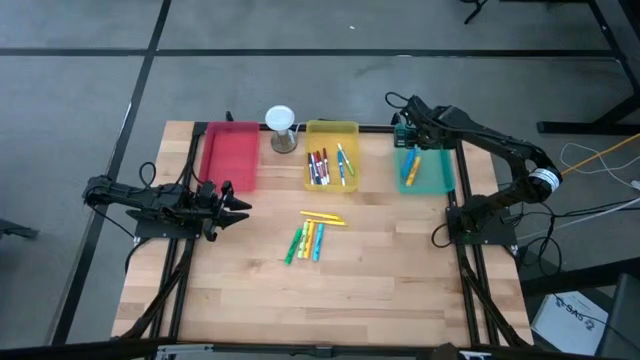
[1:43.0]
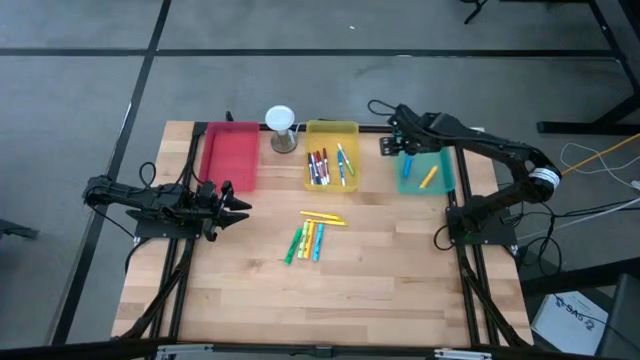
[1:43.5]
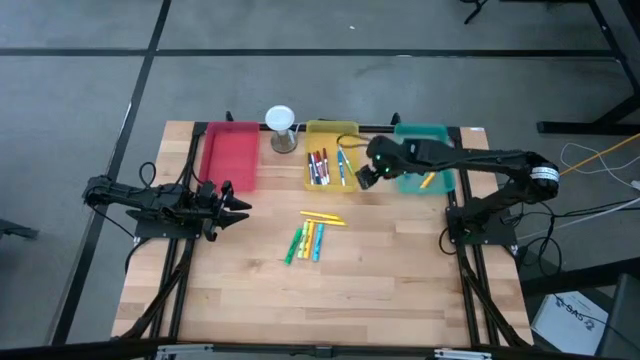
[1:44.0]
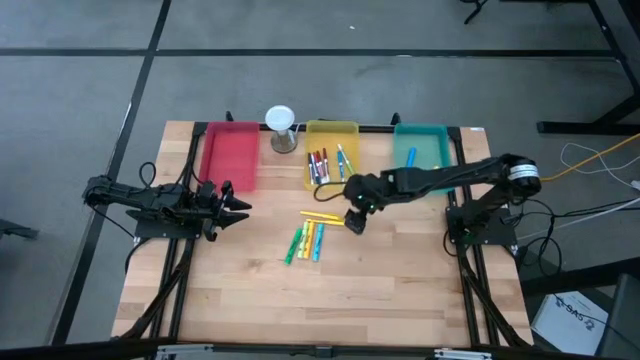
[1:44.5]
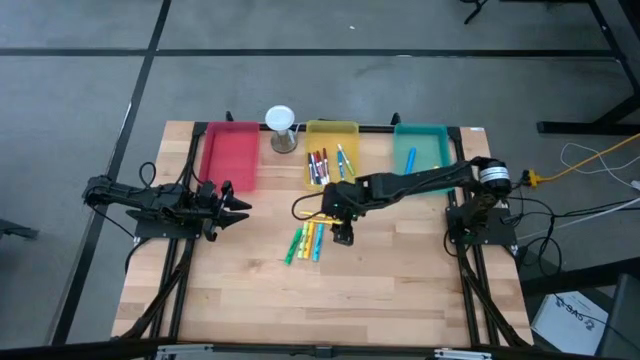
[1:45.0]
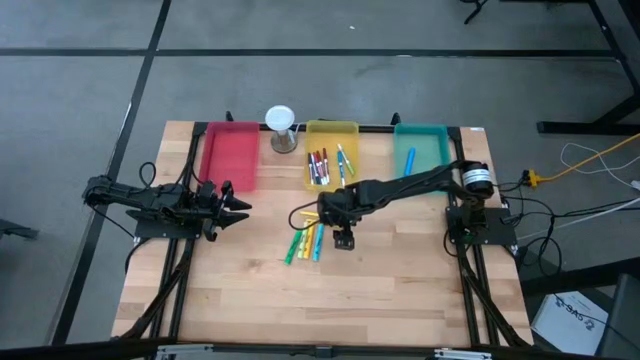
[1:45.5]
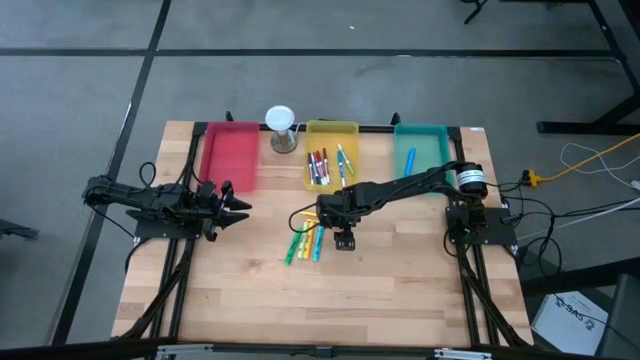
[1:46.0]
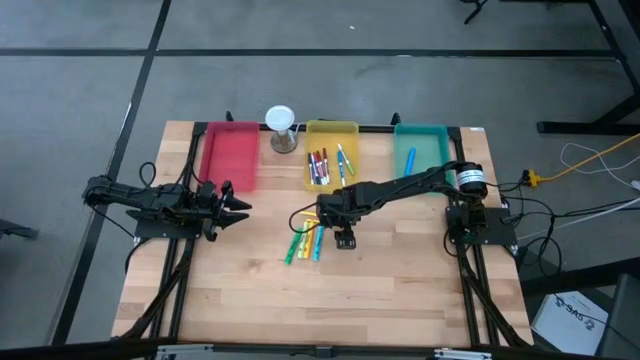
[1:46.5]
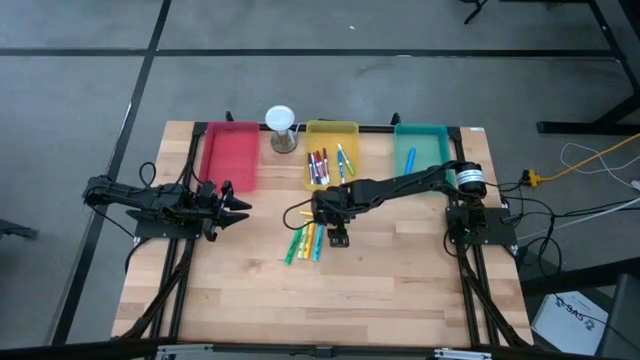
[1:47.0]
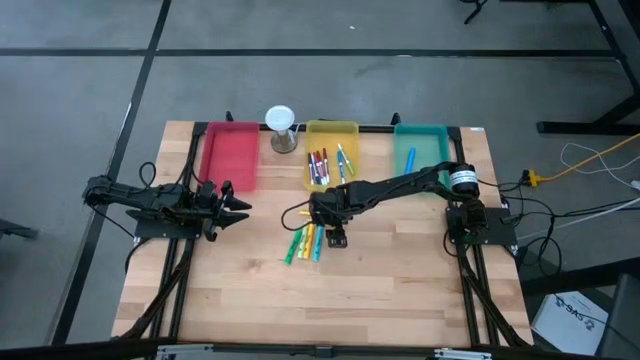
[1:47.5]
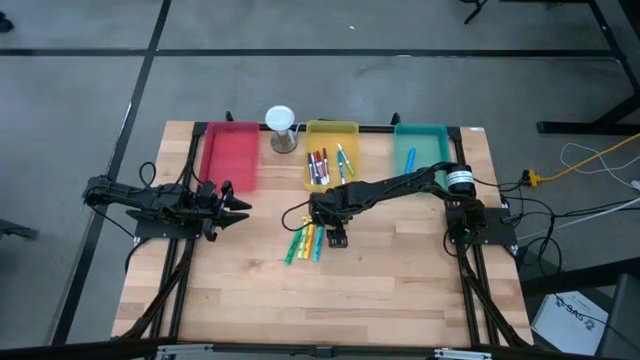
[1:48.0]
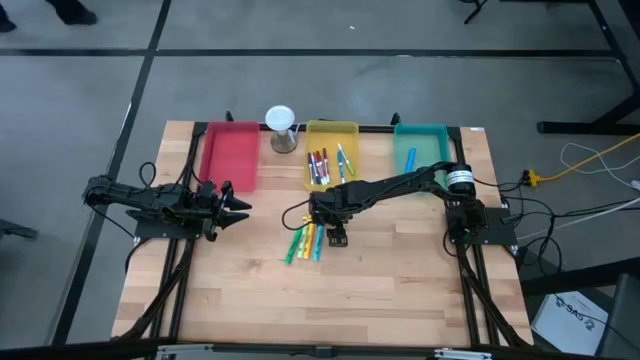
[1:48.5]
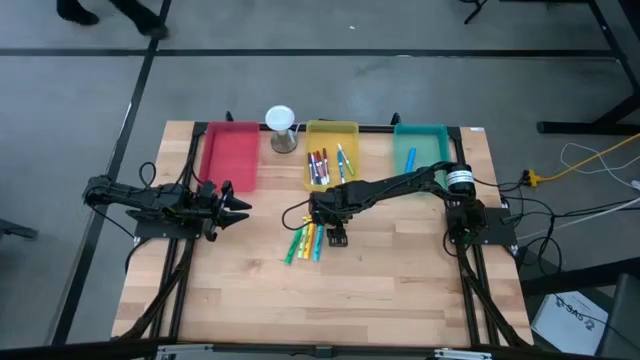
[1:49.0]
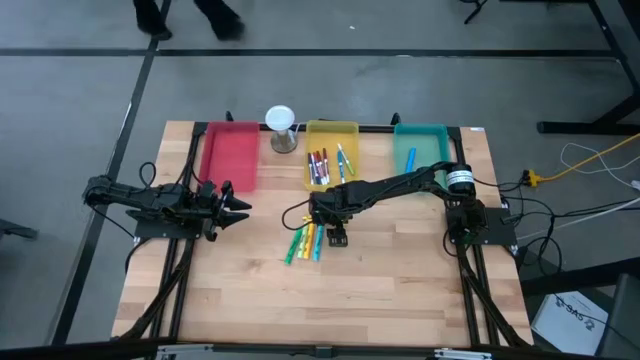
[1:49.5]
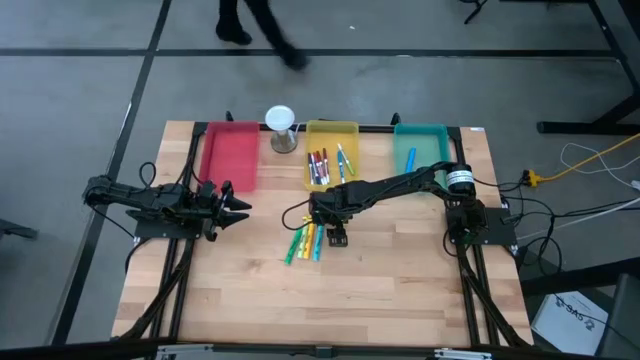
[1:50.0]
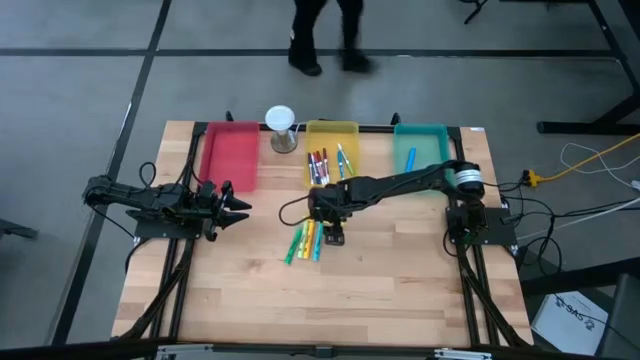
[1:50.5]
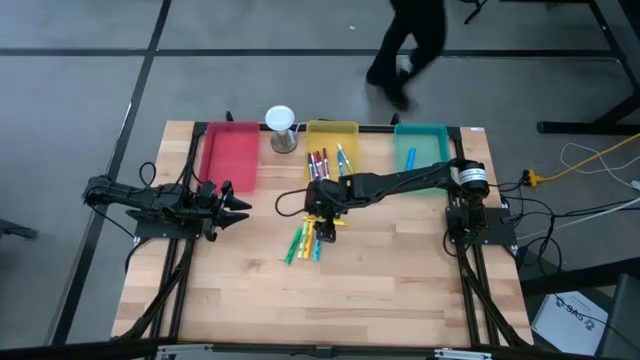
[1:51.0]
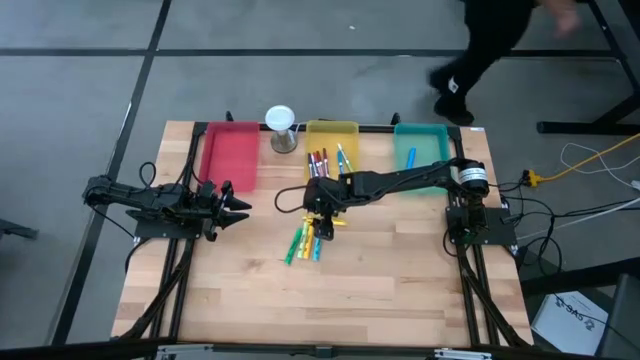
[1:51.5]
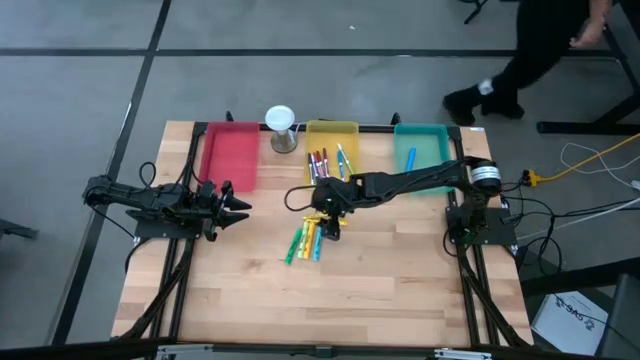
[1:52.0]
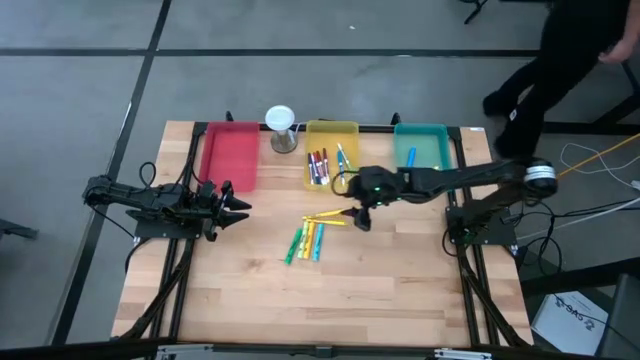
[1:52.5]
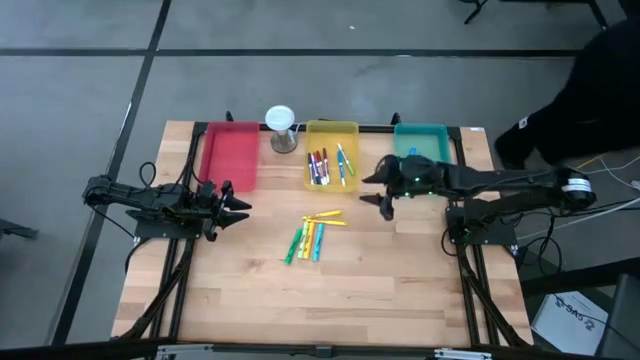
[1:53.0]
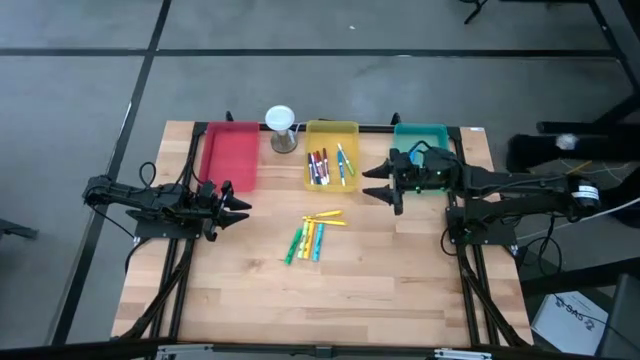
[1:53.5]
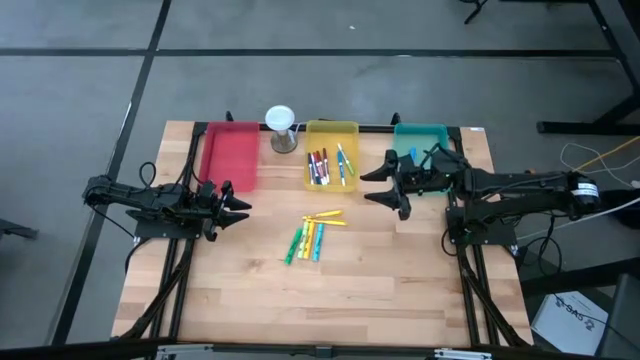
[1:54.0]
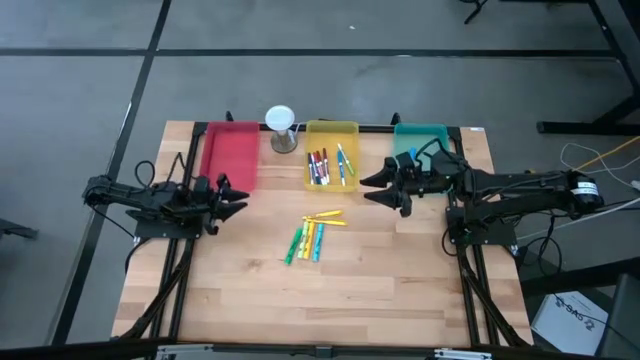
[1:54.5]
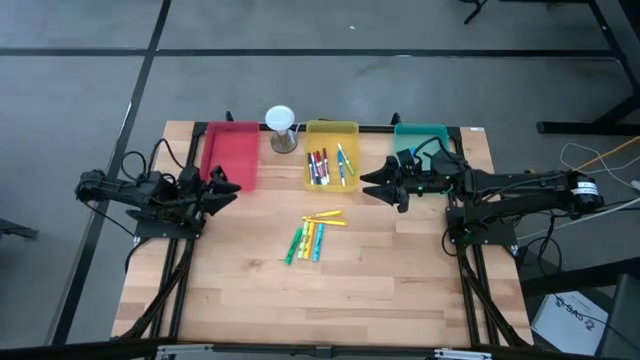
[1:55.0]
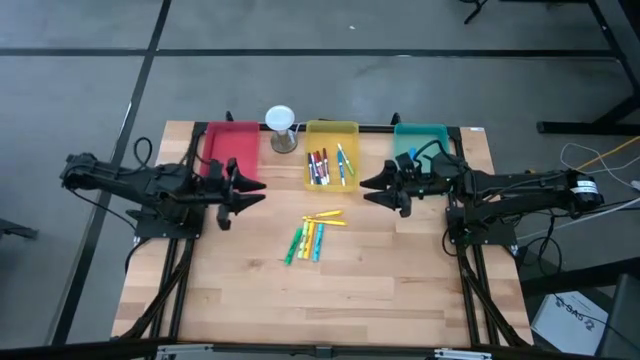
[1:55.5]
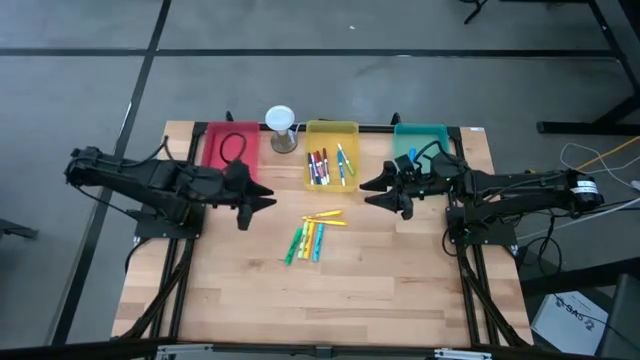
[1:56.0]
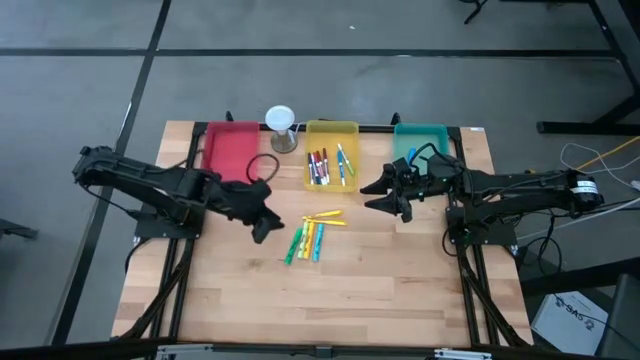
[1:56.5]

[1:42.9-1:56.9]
Task: Pick & Place Markers
Put the green highlighter into the blue bin

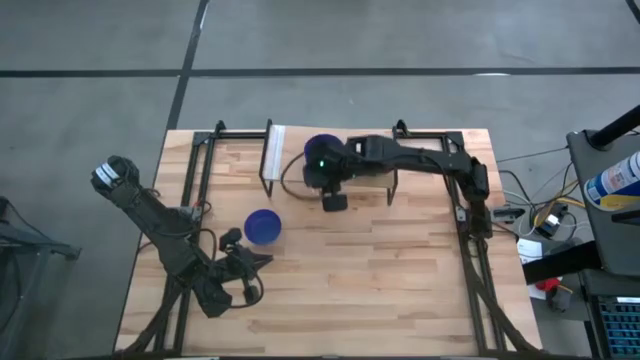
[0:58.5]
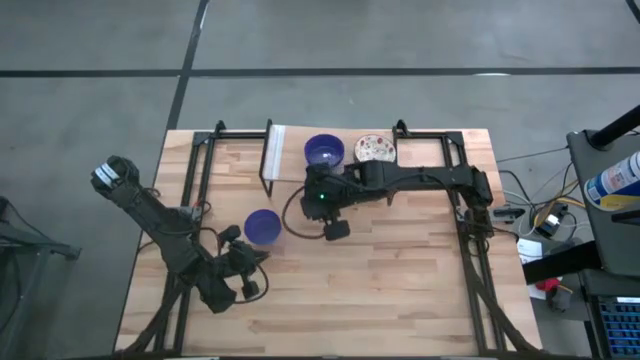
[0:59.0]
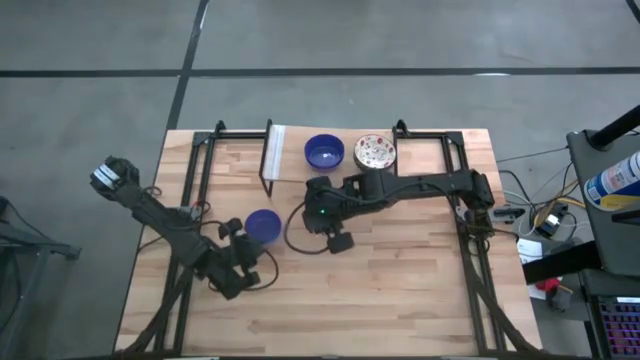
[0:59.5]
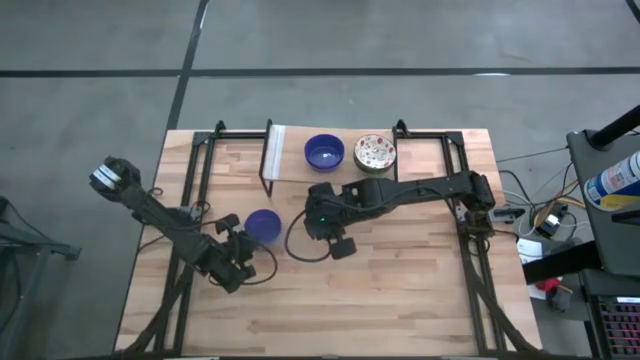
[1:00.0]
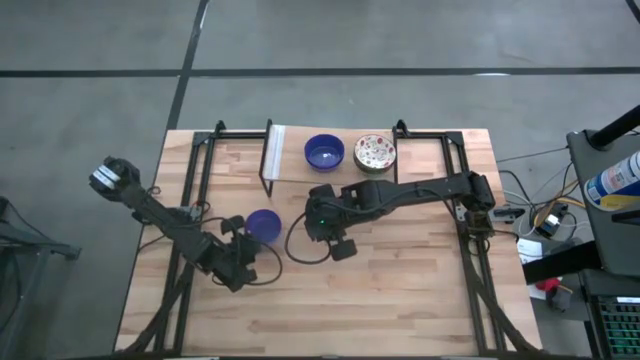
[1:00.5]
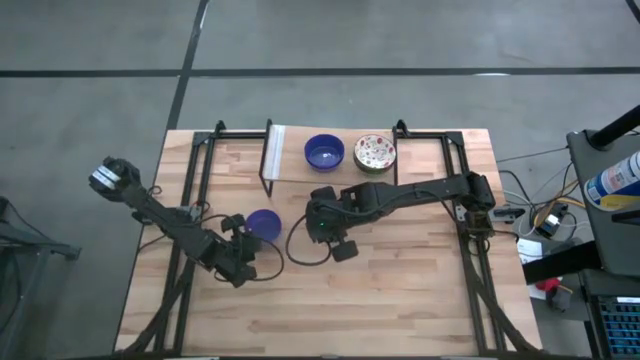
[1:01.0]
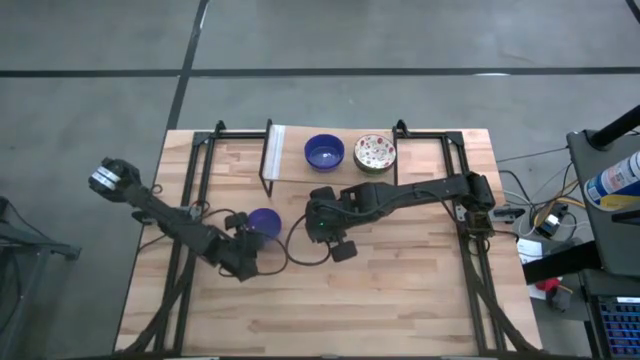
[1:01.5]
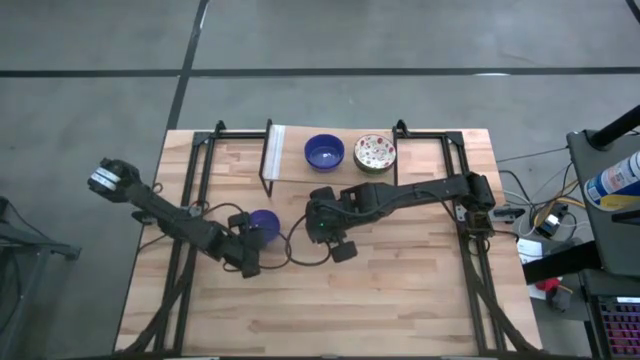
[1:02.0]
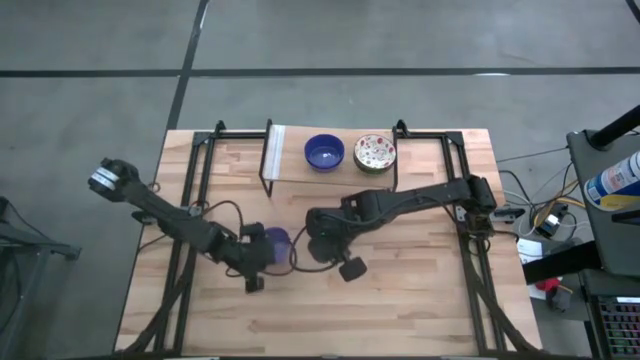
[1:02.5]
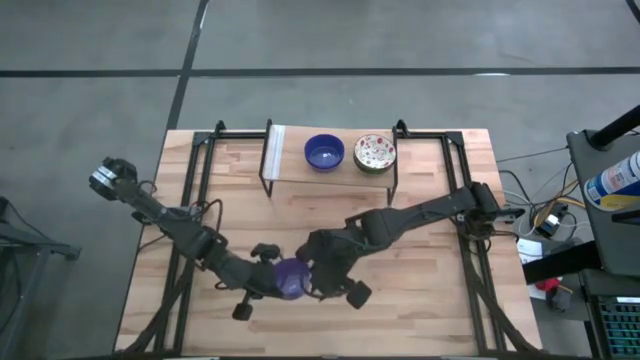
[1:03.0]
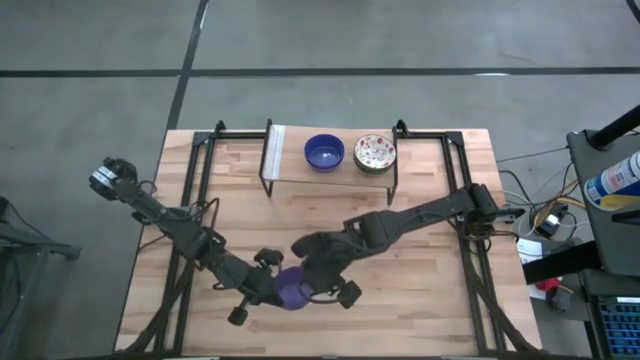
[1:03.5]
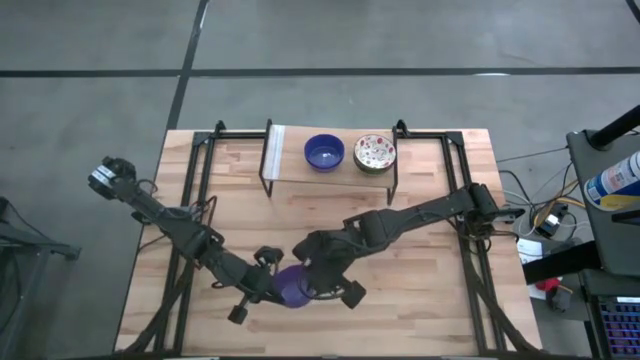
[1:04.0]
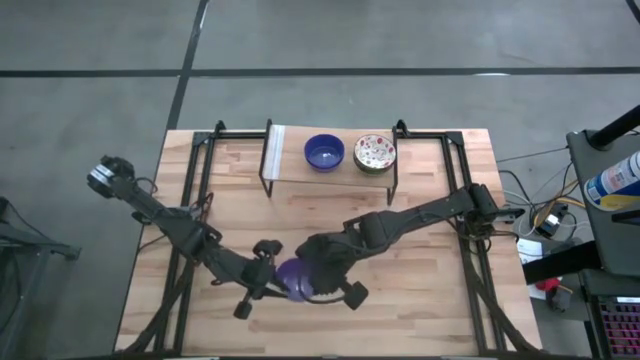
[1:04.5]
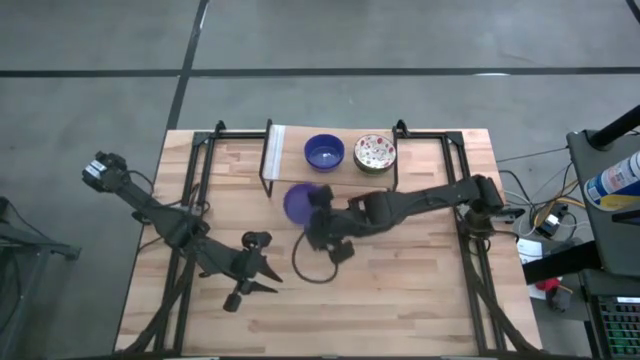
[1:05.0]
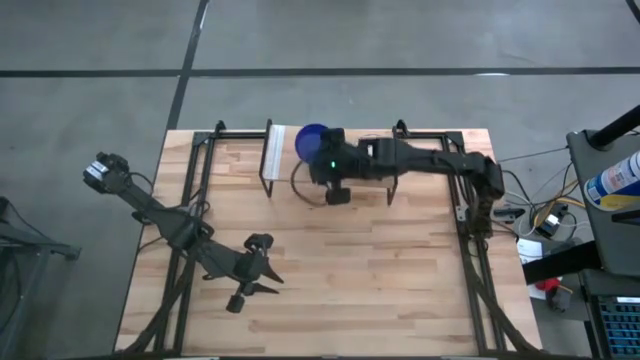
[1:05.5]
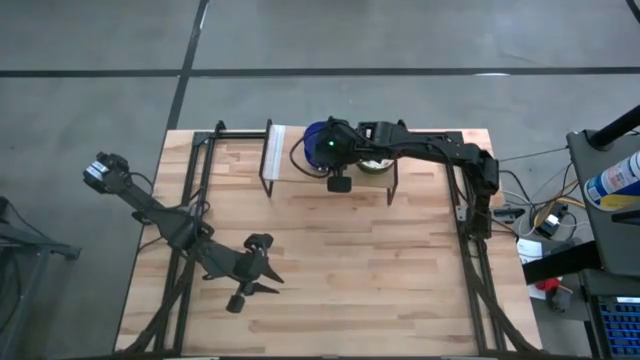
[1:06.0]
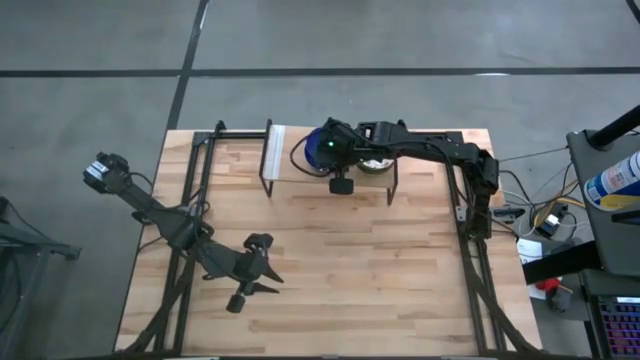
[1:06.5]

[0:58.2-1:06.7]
Task: Pick & Place Mini bowls
Stack the blue bowl on top of the stacked blue bowls on the shelf
